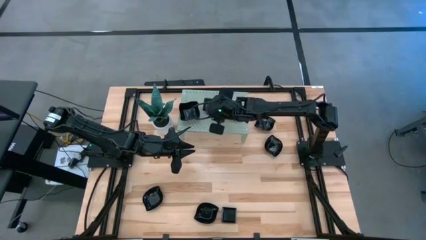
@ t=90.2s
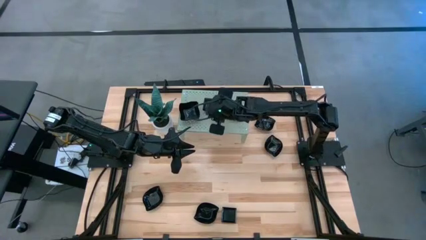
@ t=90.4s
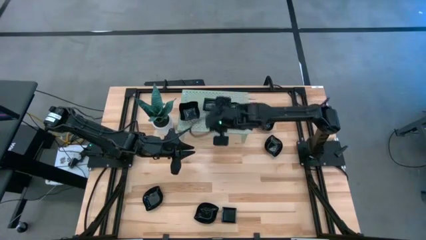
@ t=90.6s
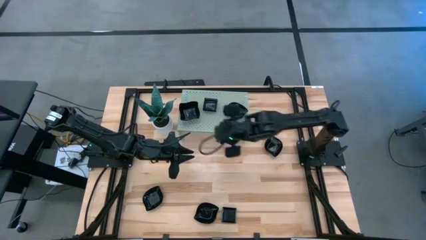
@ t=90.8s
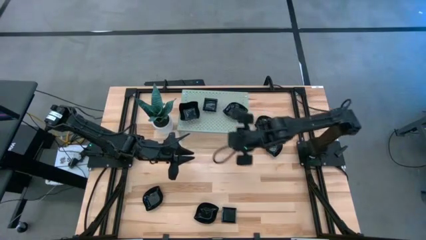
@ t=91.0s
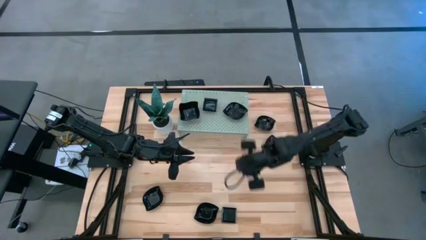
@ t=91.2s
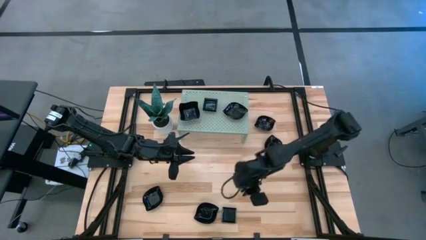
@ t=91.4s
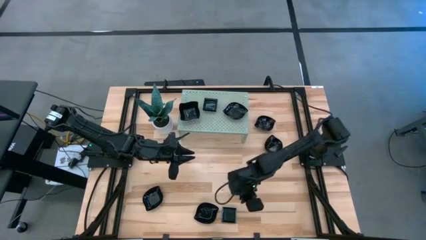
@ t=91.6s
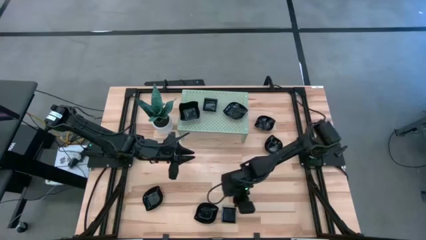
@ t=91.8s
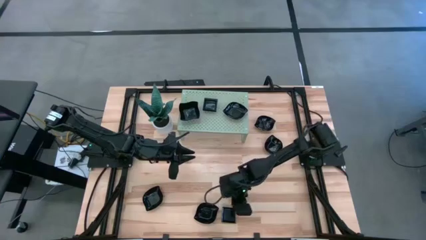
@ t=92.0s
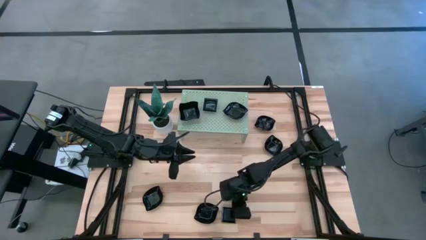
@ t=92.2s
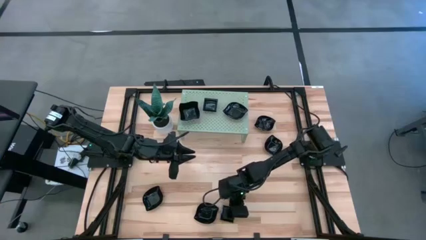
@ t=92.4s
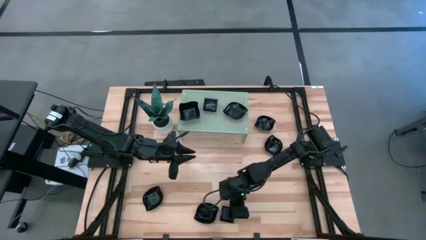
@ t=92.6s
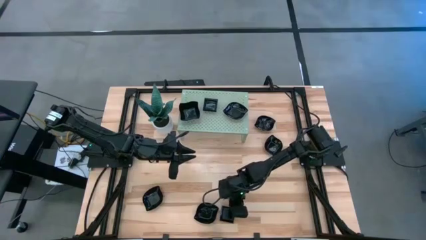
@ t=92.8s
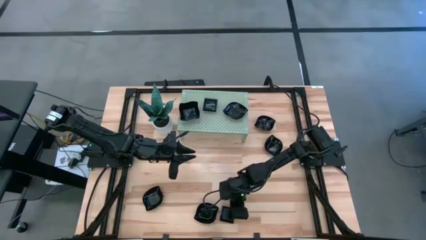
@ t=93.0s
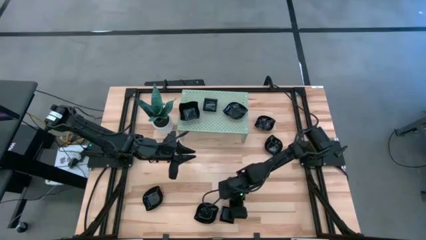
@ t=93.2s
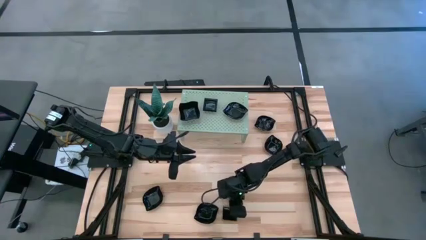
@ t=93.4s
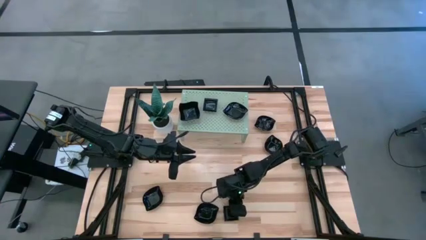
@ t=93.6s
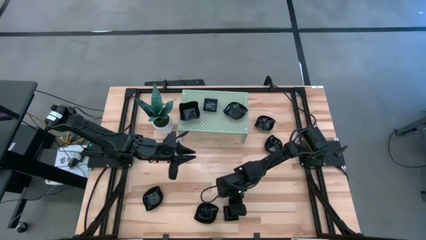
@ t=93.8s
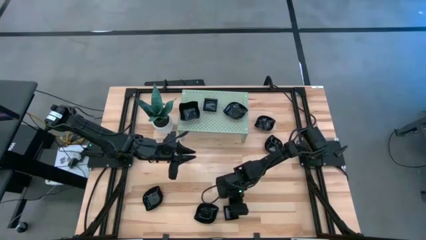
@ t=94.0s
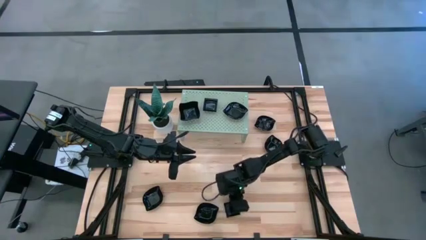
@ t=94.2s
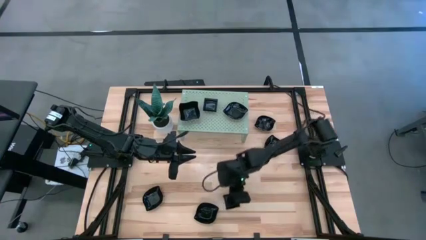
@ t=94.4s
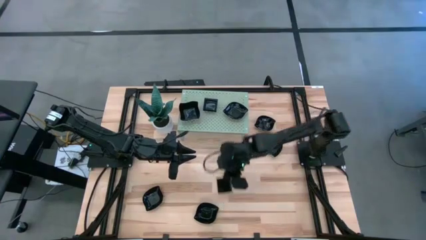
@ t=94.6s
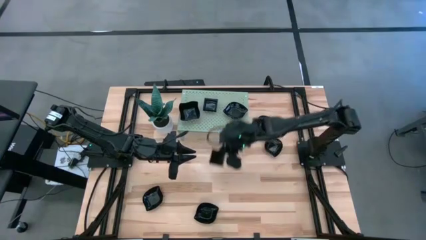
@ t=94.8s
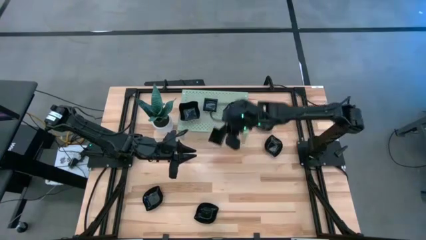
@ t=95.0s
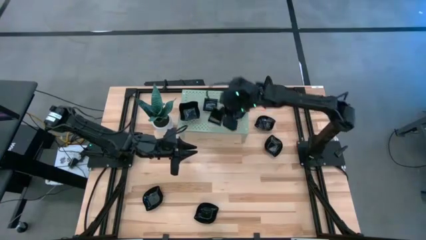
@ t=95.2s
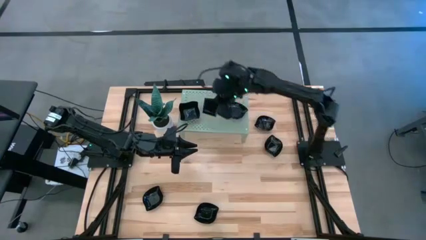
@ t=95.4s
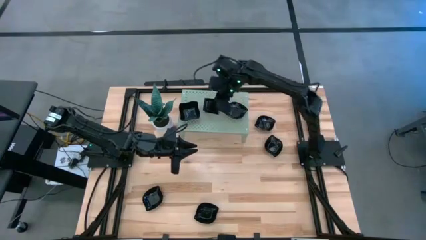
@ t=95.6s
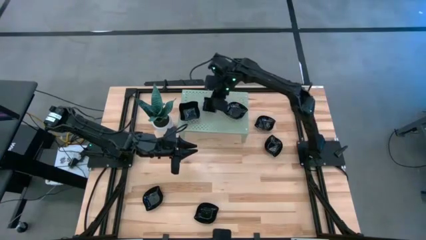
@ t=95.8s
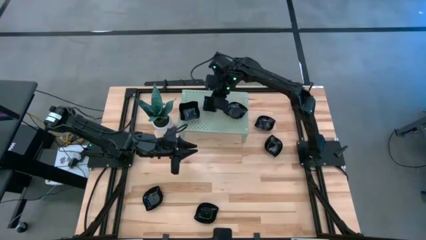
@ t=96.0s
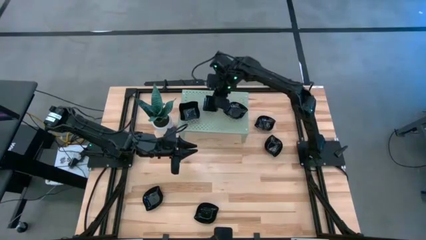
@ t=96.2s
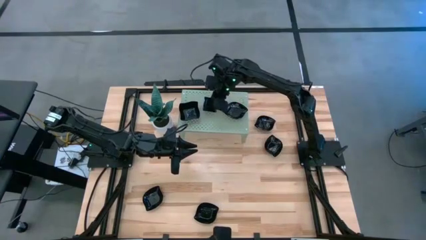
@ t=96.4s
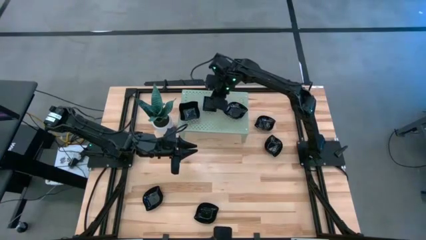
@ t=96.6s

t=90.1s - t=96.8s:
Task: Pick & Place Mini shaped plates
Stack the square plate on top of the other square plate on the shelf

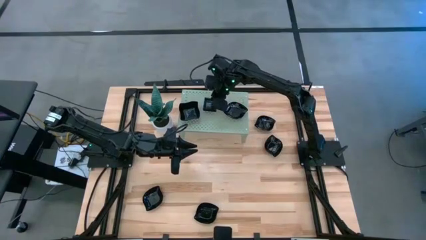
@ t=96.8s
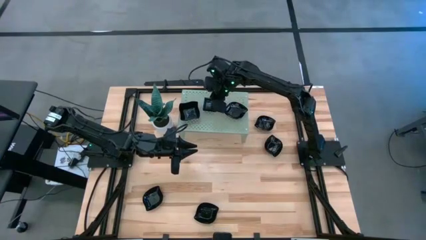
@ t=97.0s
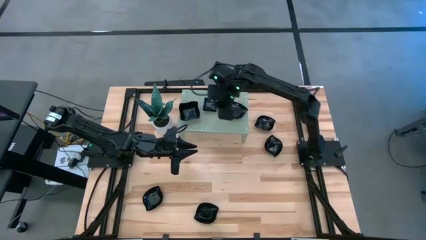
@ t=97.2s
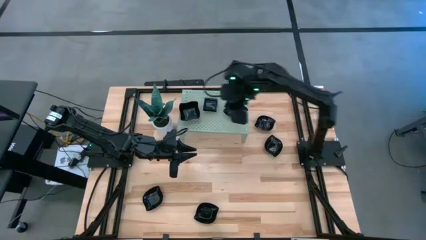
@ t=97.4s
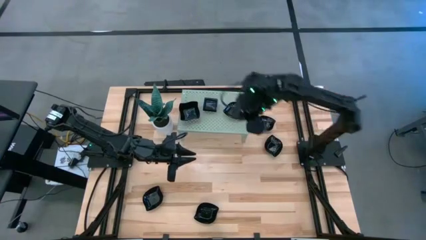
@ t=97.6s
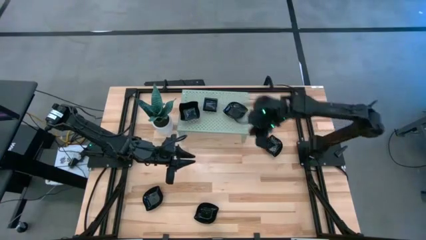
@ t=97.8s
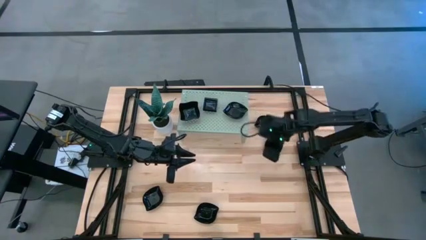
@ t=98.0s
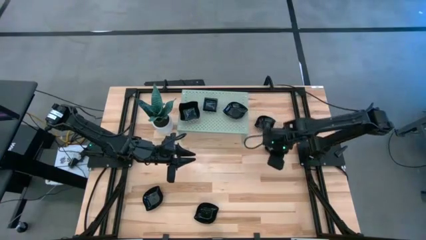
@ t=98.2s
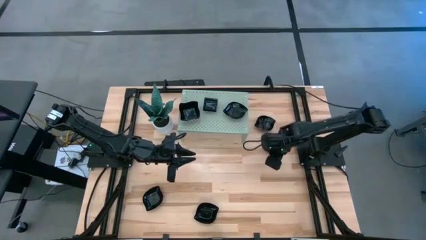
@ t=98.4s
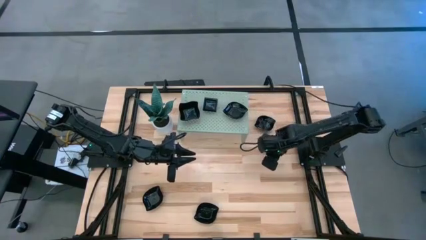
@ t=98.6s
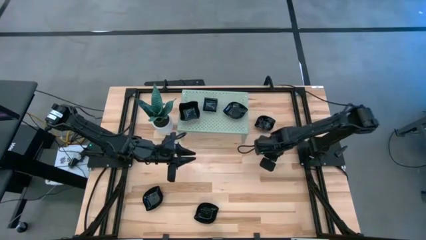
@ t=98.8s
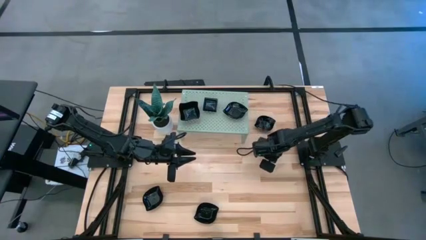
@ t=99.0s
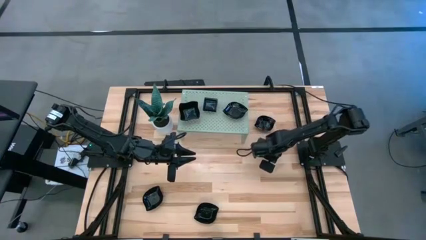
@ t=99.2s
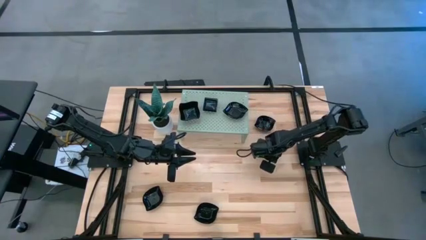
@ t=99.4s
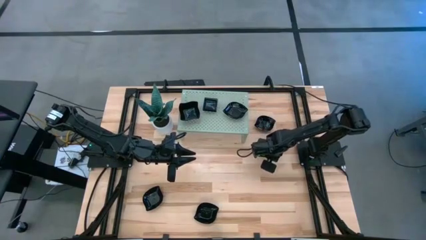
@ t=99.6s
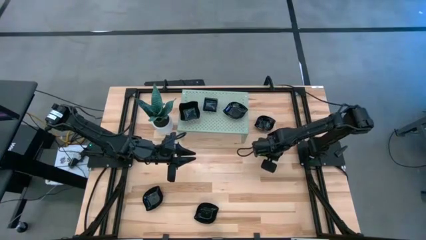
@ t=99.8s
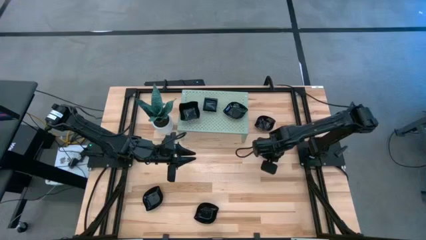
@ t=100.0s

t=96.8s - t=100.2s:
Stack the leaf-shaped plate on top of the other leaf-shaped plate on the shelf

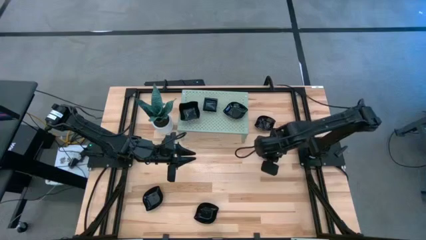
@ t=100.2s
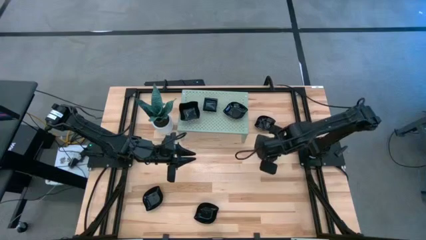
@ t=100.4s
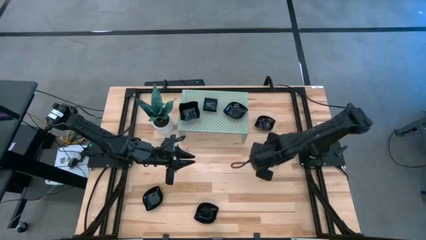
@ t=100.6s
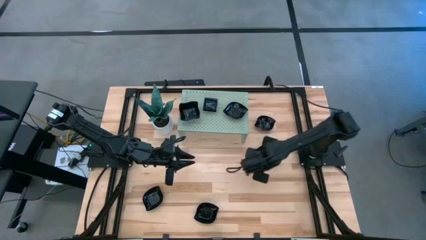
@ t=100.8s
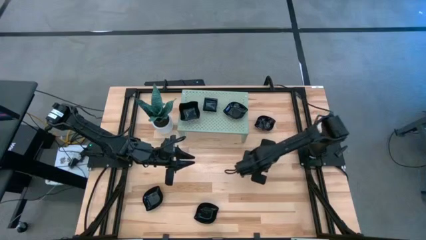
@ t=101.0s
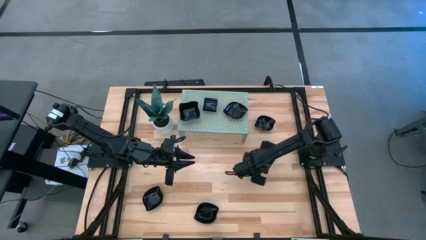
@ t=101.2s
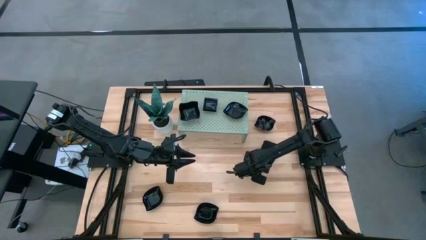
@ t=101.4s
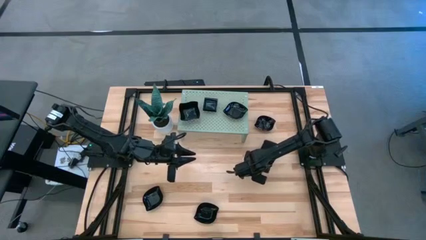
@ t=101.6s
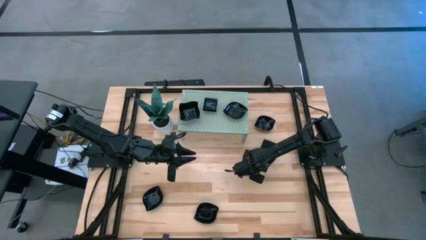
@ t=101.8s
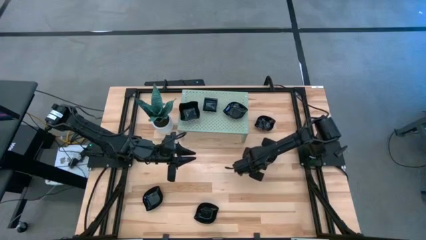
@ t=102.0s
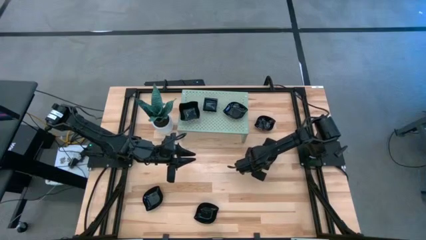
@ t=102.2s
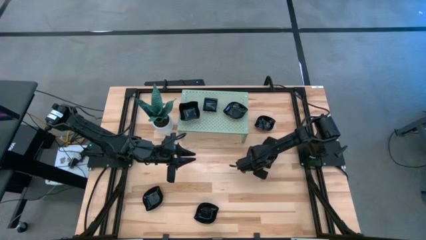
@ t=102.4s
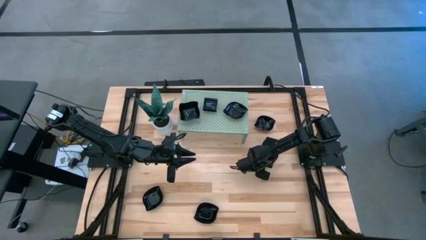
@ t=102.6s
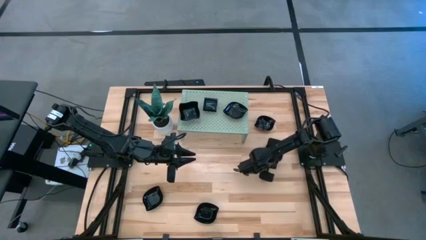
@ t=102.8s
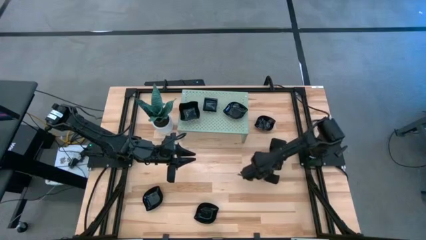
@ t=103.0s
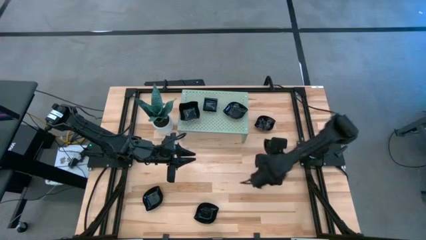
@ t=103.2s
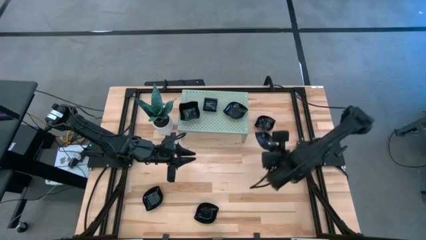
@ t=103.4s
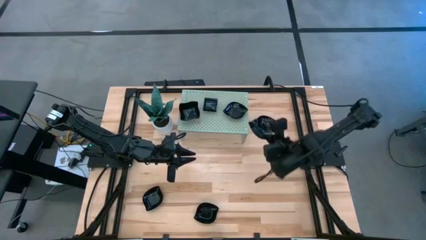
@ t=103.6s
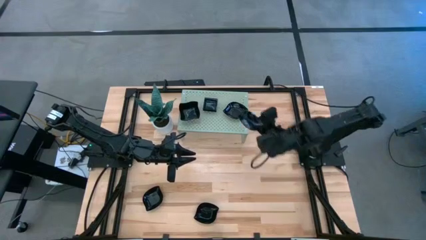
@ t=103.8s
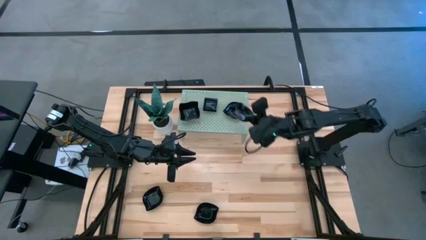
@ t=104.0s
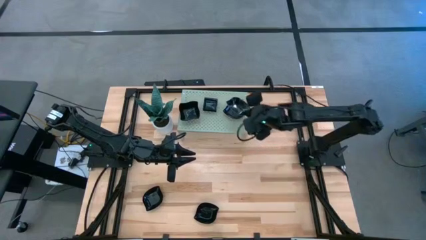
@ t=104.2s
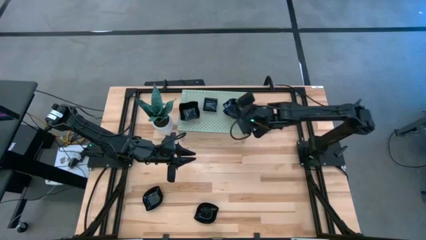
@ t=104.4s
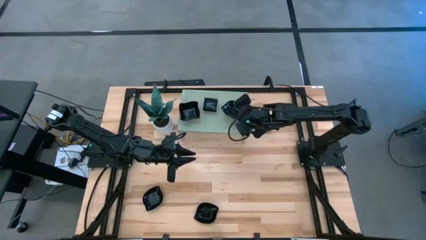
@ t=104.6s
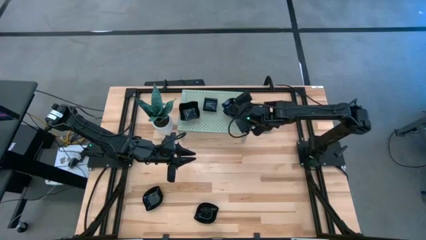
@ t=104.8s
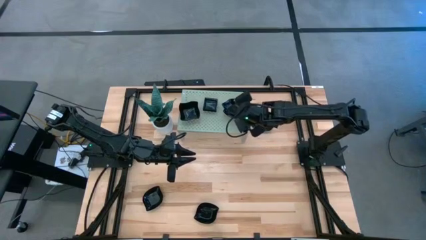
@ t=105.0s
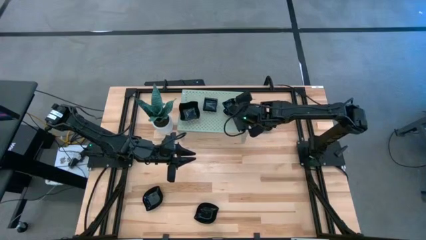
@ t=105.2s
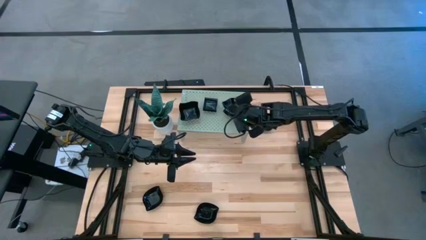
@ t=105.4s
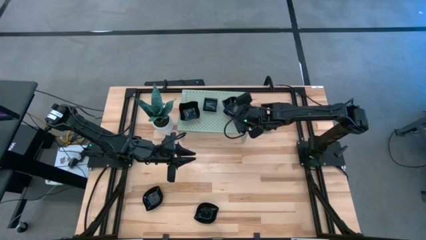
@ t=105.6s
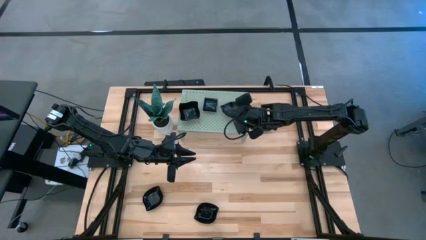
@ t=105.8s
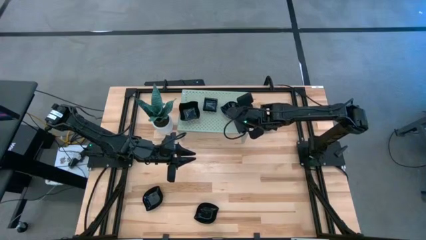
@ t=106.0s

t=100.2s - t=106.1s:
Stack the leaf-shaped plate on top of the other leaf-shaped plate on the shelf

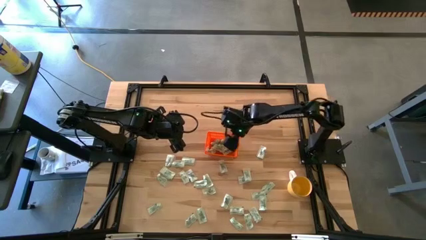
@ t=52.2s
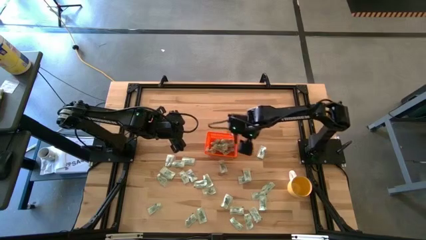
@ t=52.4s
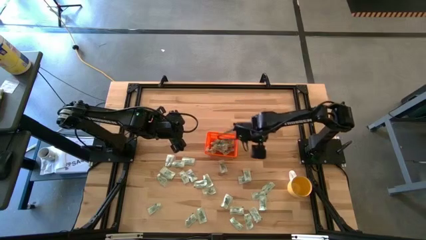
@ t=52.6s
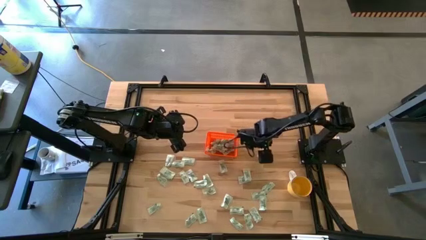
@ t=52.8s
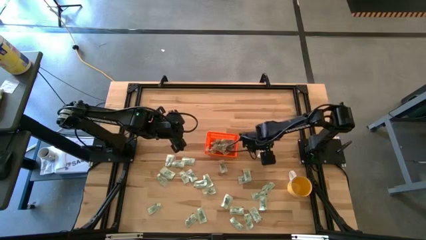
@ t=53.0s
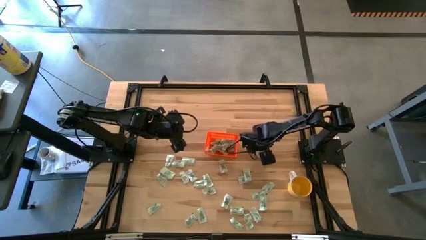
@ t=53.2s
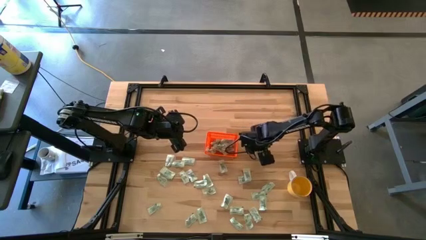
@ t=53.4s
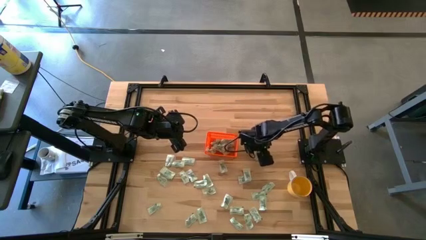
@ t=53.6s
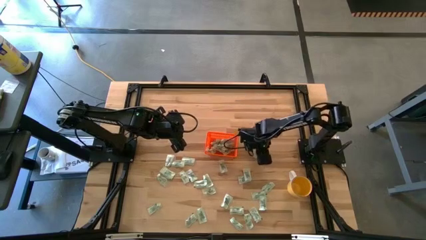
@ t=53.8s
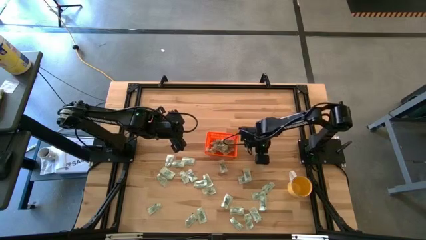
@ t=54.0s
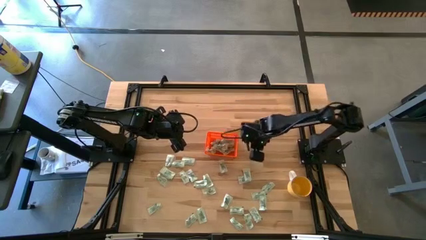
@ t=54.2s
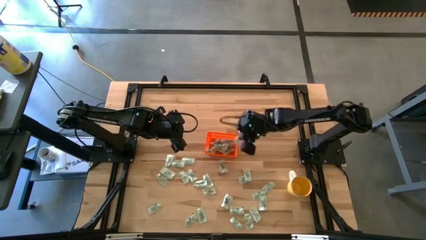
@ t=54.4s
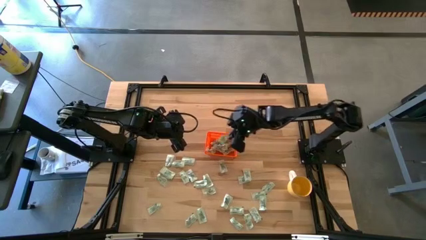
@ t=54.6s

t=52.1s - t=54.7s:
Task: Pick and place Stevia / Truvia into bins
Put the light green stevia packet into the orange bin
